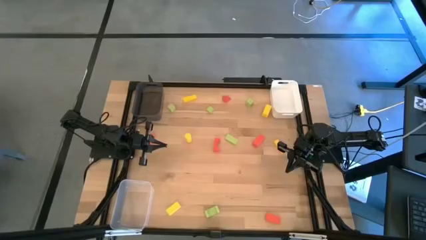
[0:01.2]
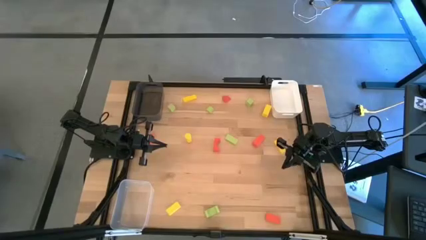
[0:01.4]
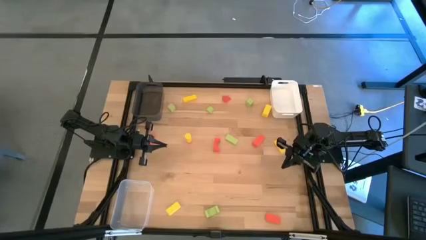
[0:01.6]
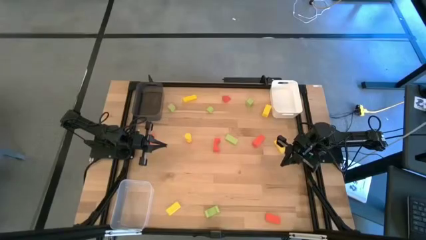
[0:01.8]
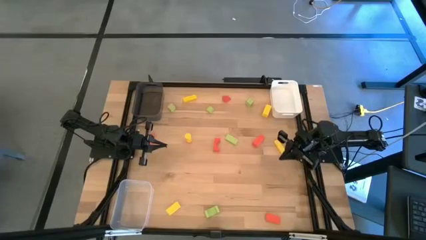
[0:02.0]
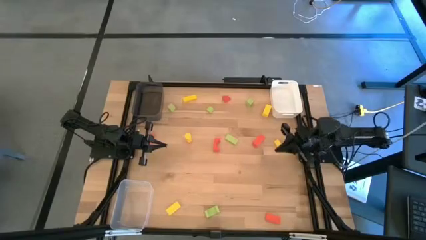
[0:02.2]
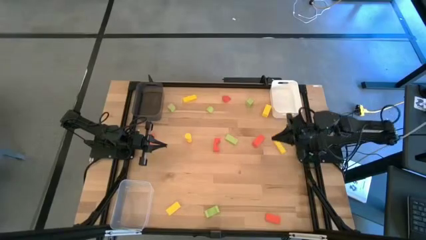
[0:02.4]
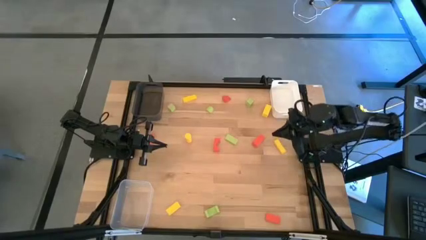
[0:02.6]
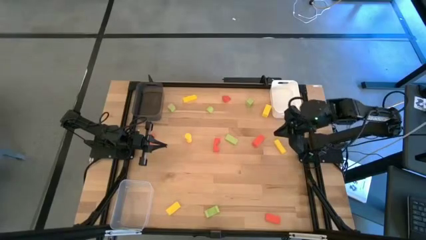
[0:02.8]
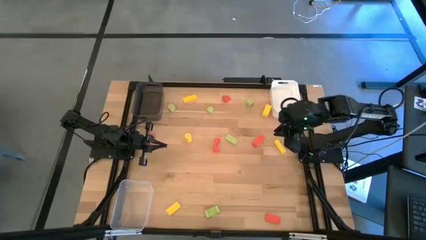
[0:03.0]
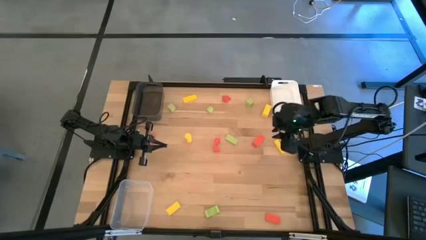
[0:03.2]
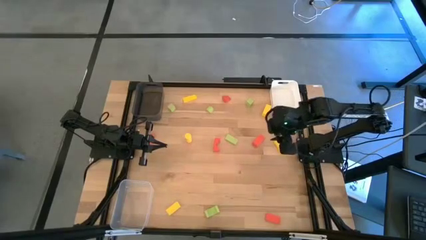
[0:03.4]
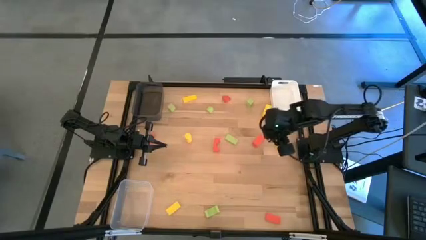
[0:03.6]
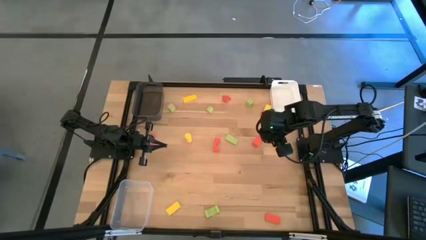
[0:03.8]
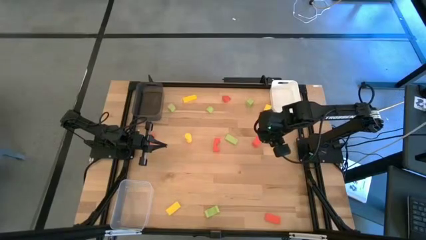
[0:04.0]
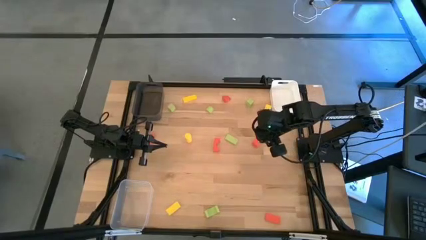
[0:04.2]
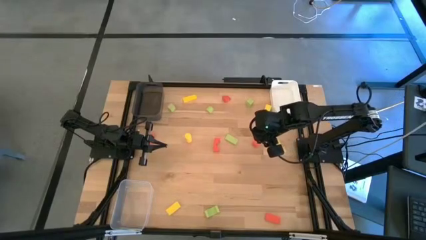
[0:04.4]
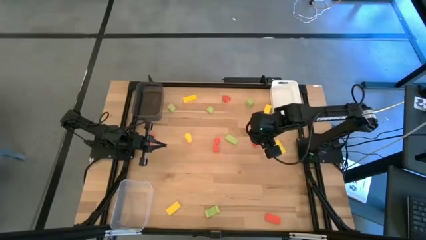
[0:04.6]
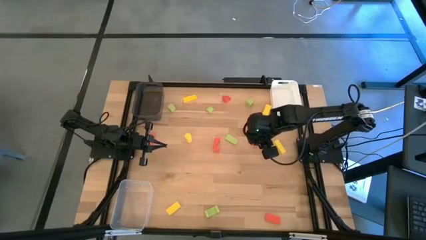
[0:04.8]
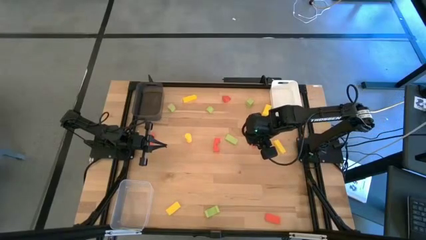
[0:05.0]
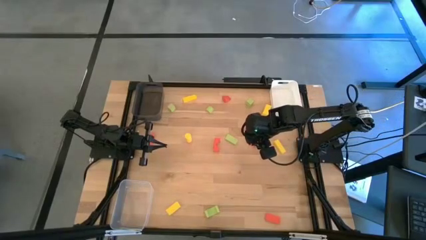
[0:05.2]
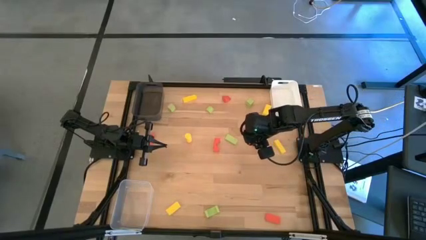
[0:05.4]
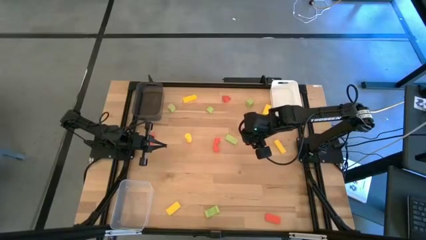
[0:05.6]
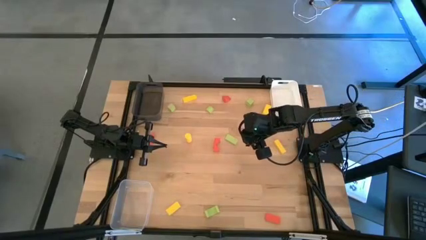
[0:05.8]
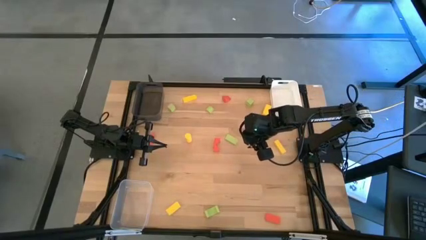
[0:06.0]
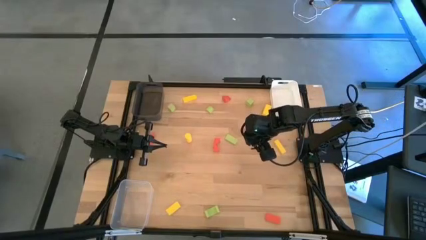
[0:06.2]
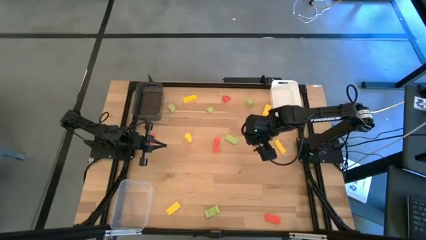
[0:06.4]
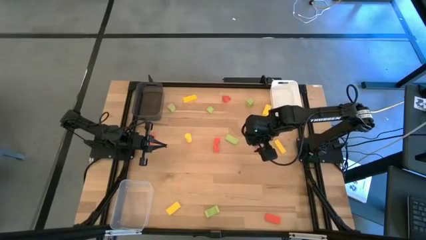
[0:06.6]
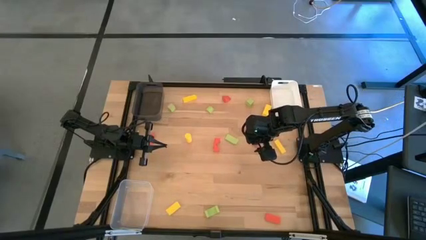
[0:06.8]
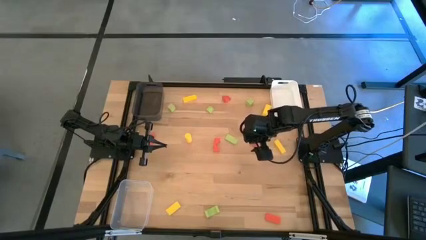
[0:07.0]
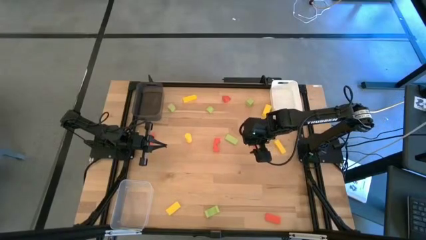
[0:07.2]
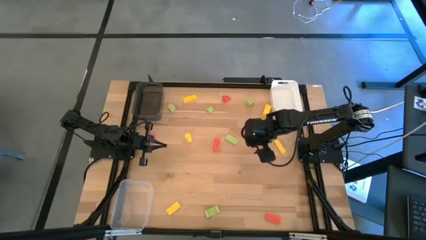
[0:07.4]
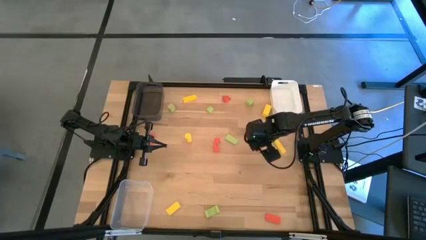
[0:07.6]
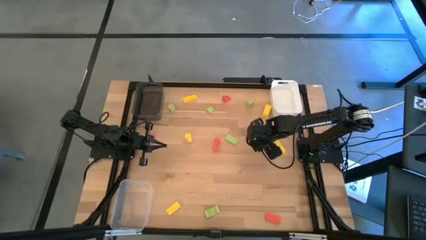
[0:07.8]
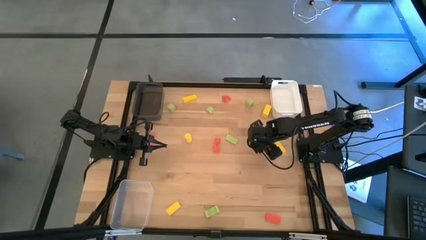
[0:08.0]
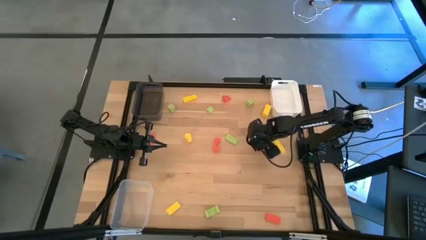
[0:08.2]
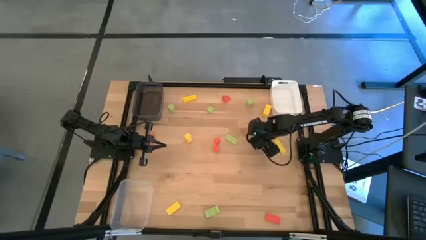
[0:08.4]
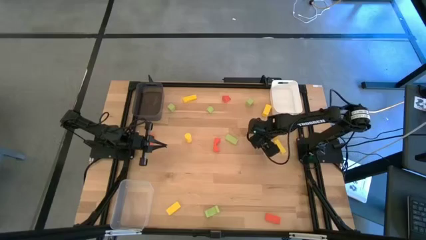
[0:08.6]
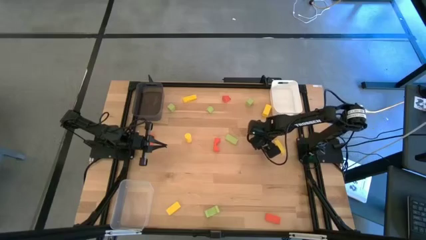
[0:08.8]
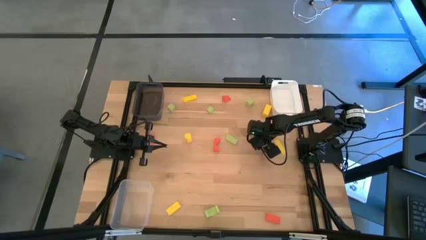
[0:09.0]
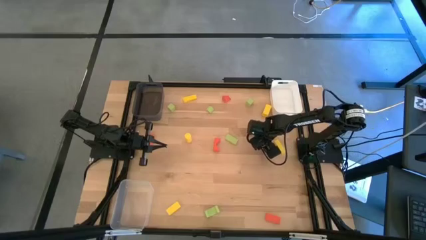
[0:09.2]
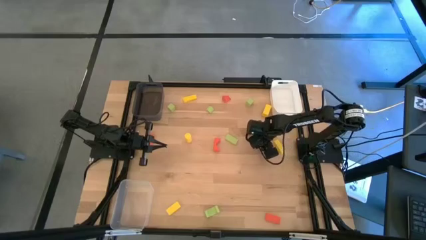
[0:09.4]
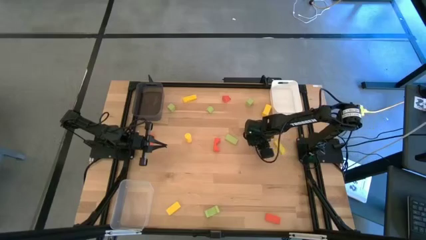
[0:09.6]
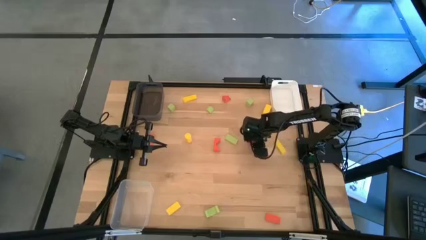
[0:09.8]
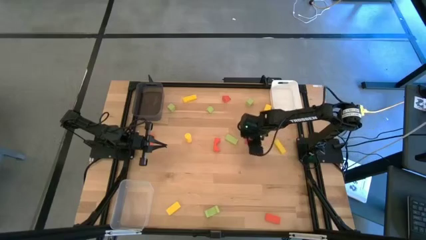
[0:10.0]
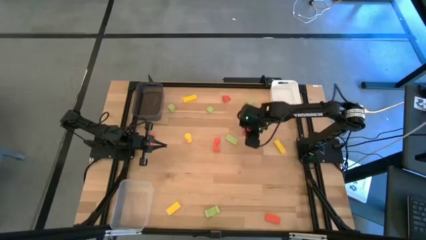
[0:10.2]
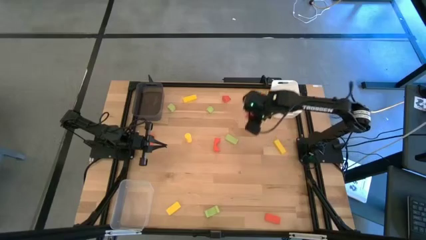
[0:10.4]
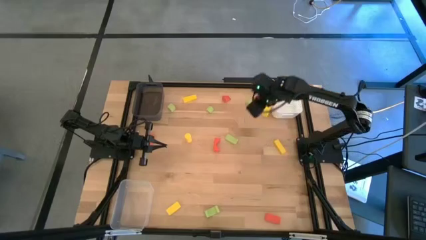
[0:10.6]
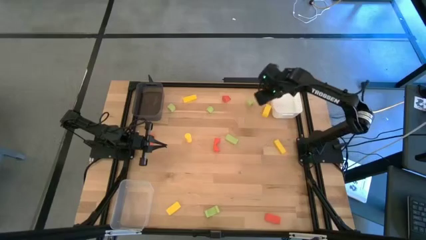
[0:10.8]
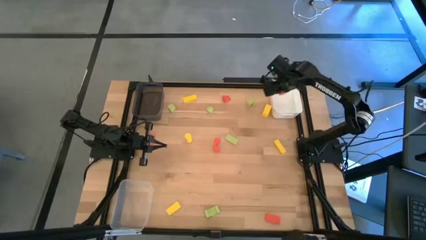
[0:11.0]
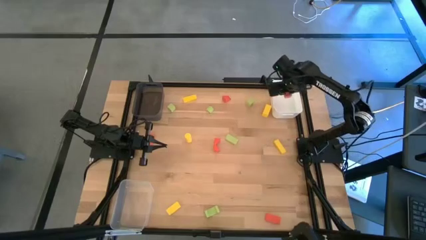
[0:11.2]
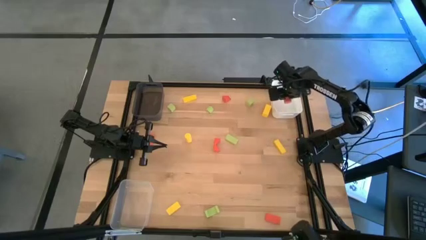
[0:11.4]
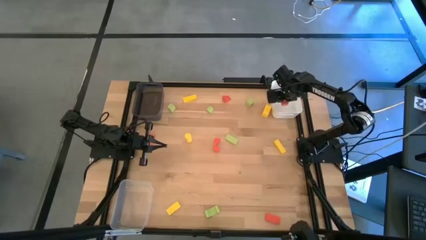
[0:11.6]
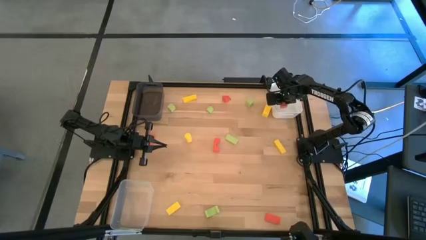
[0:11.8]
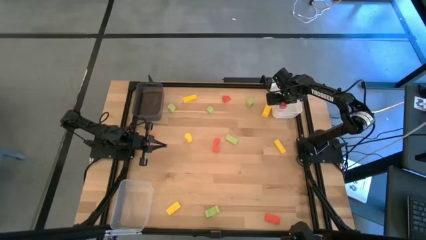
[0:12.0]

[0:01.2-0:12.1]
Task: Sort & place blocks by color
Put the orange block into the white bin
